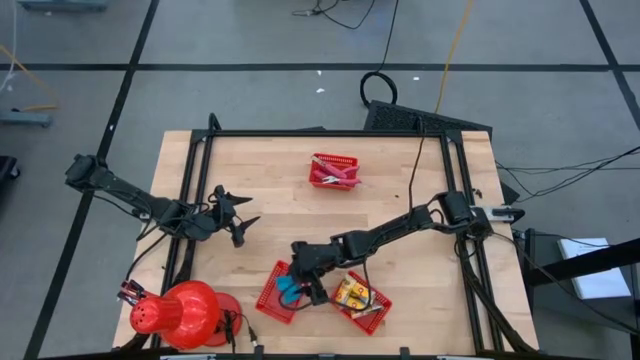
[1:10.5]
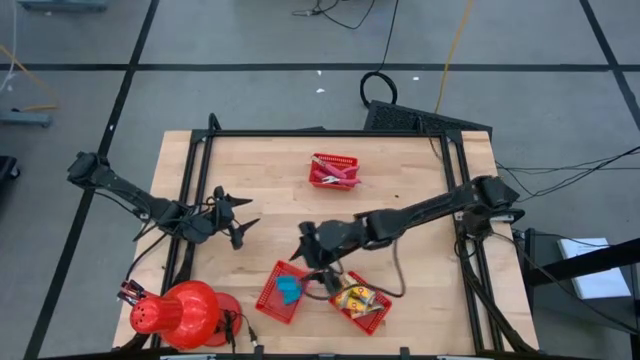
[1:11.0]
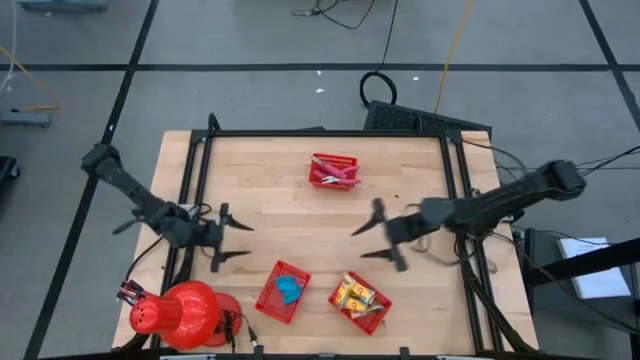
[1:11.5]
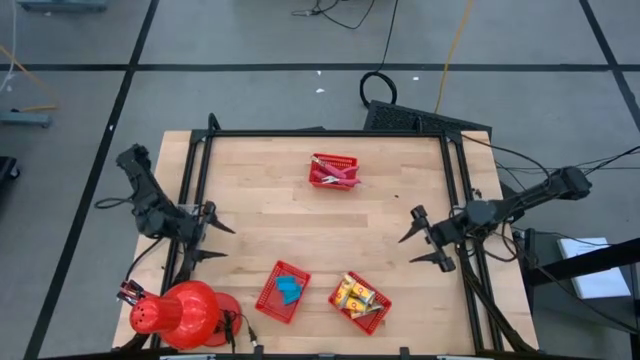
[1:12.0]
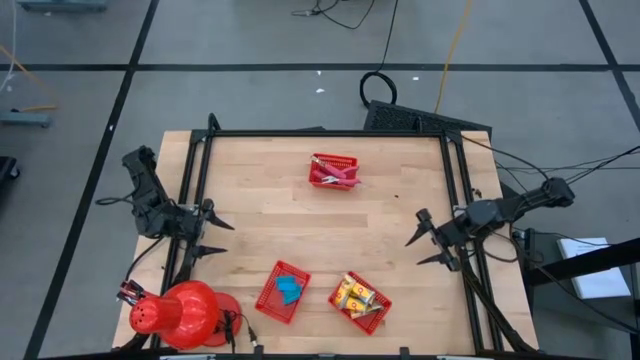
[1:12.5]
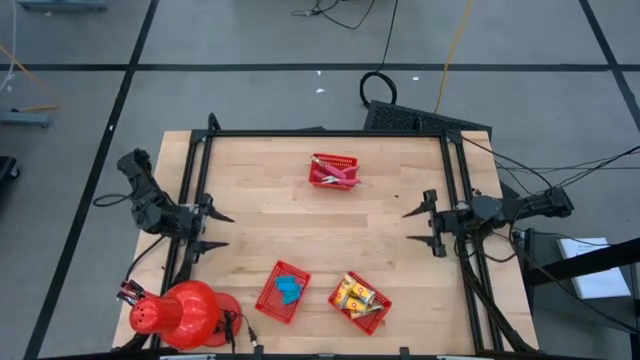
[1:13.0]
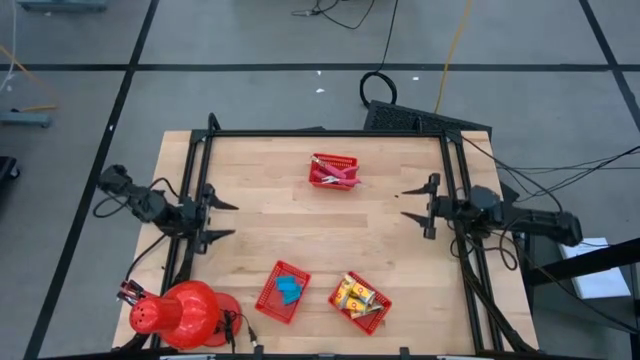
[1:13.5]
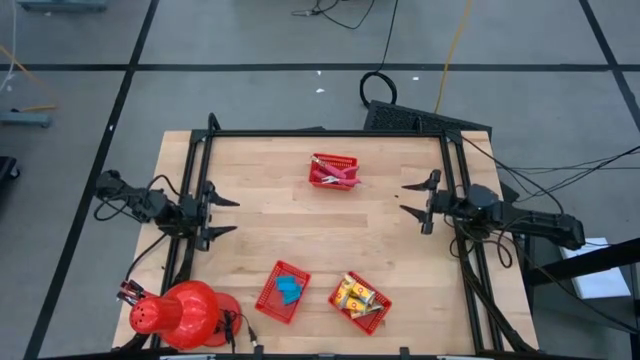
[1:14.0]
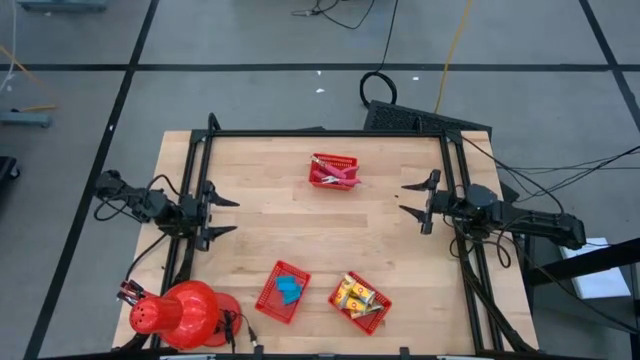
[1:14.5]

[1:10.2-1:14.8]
Task: Pick & Place School Supplies
Return to Home Position

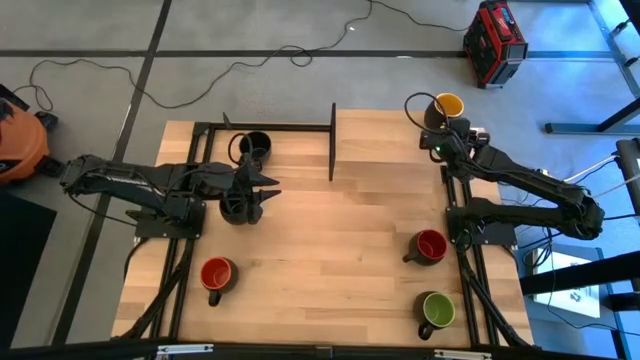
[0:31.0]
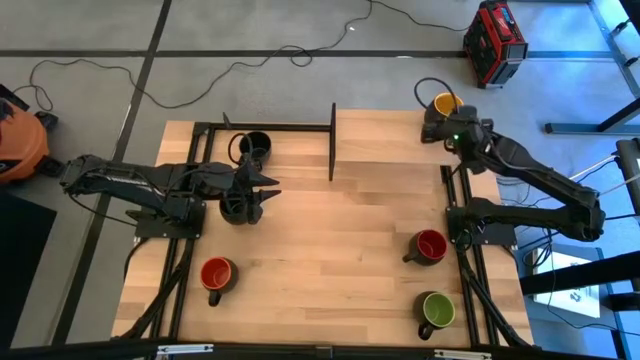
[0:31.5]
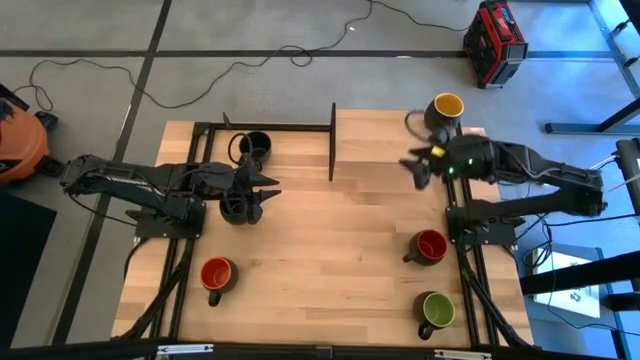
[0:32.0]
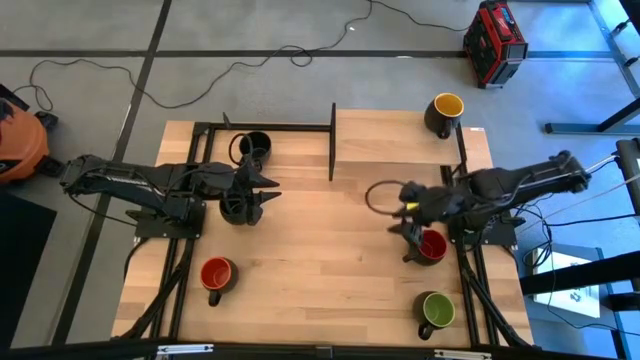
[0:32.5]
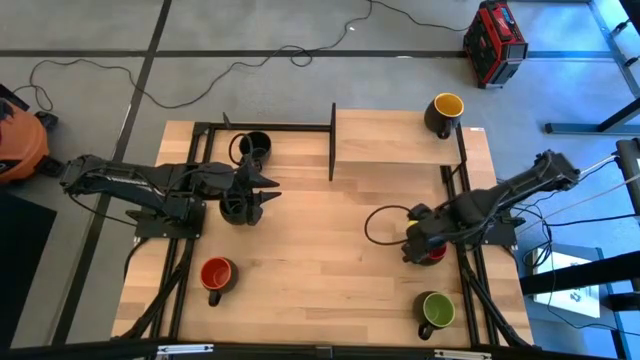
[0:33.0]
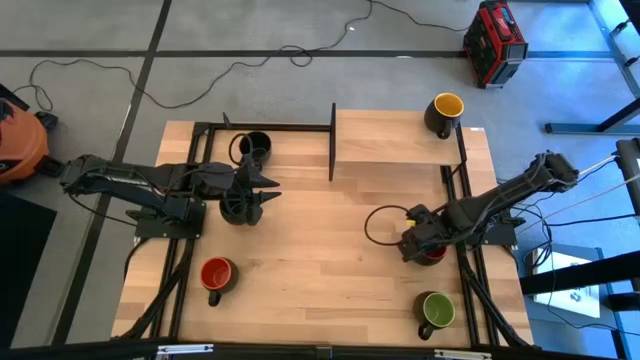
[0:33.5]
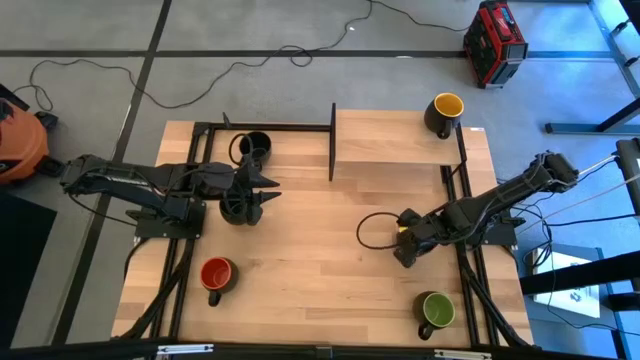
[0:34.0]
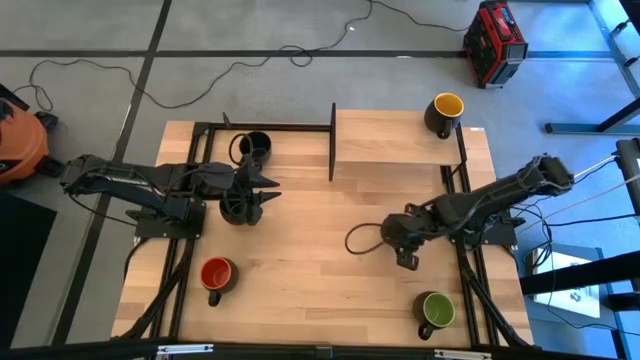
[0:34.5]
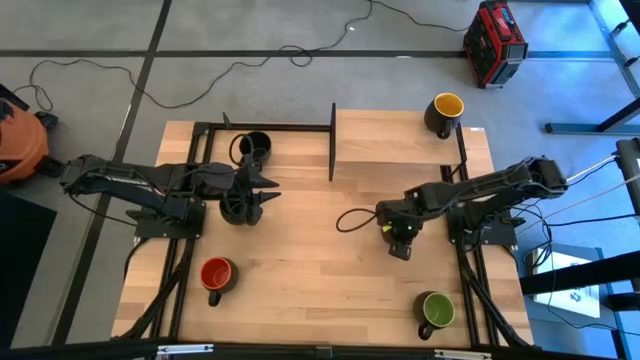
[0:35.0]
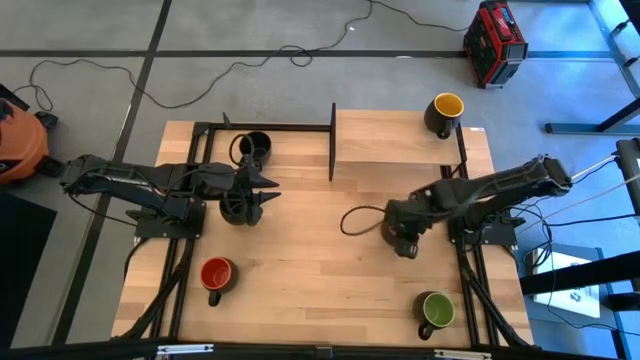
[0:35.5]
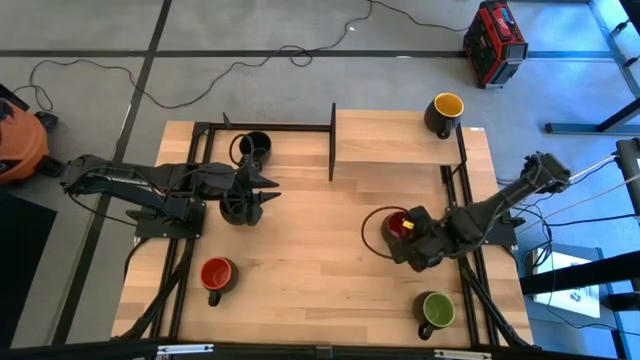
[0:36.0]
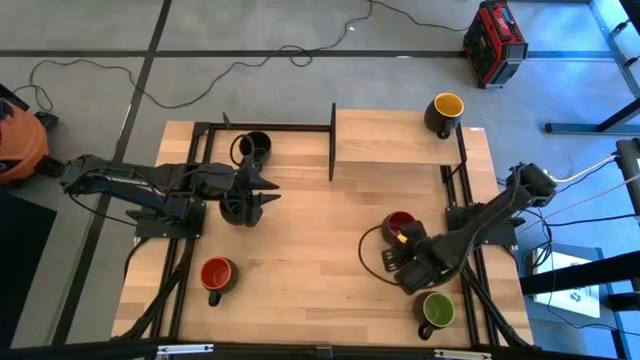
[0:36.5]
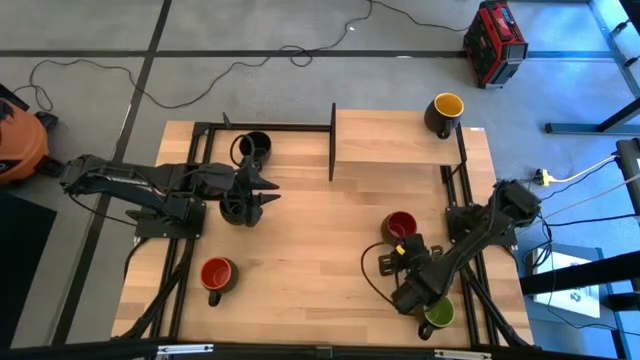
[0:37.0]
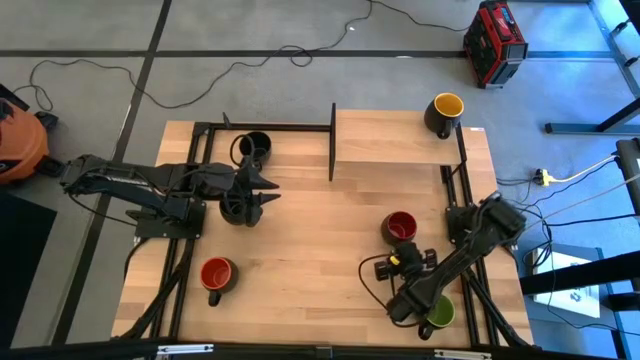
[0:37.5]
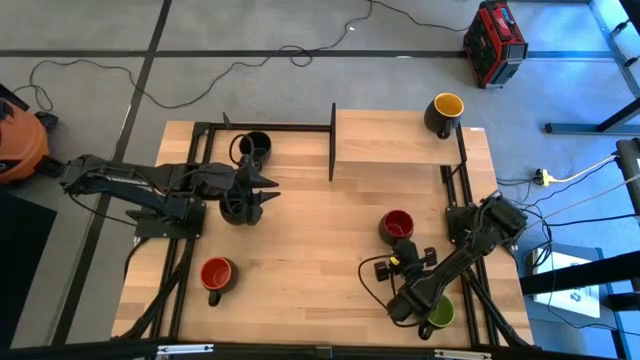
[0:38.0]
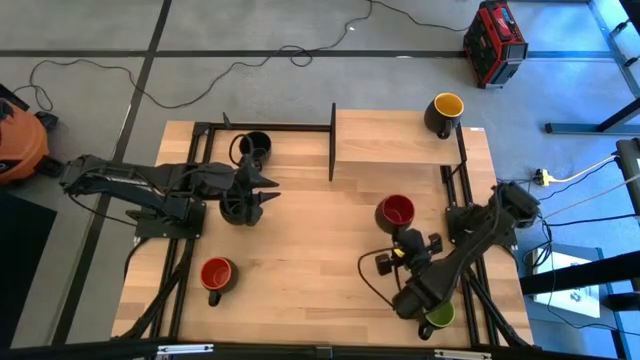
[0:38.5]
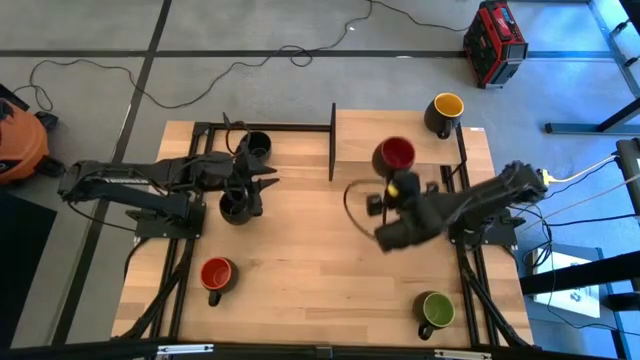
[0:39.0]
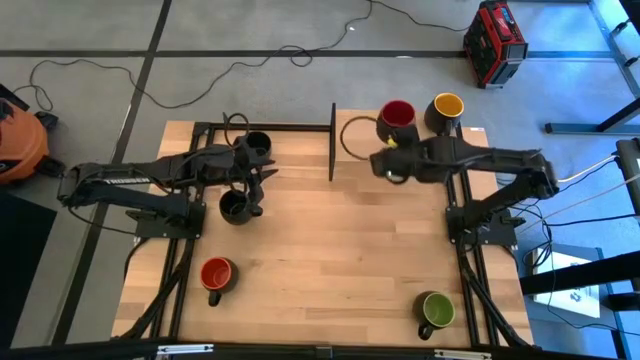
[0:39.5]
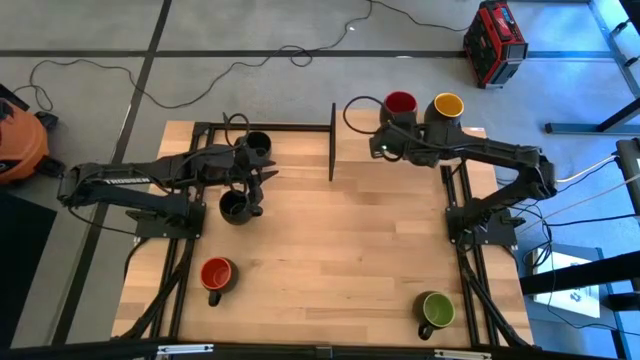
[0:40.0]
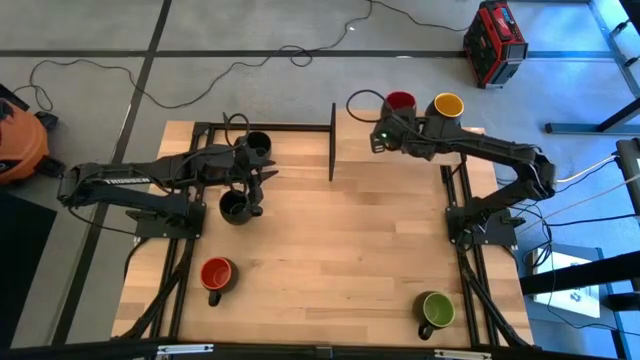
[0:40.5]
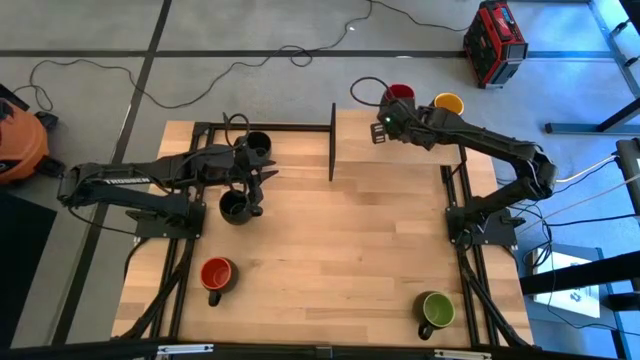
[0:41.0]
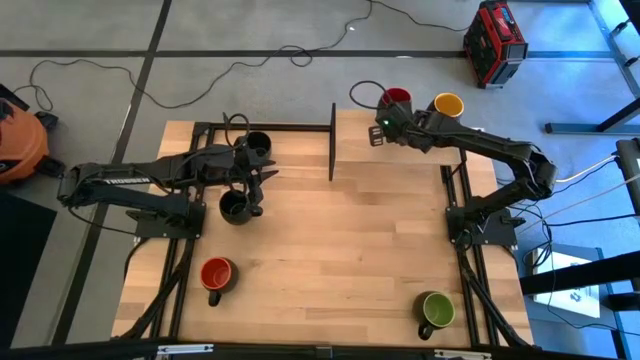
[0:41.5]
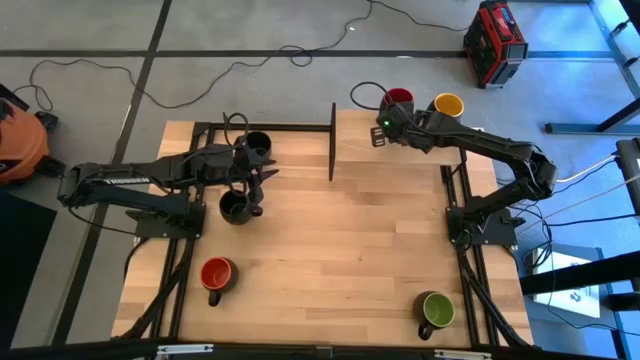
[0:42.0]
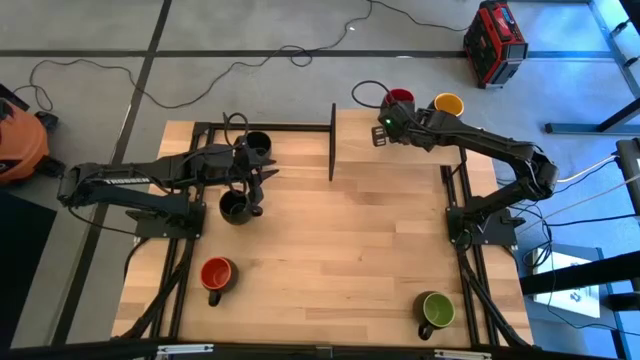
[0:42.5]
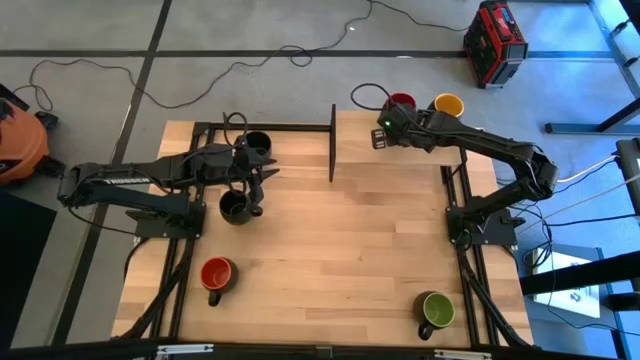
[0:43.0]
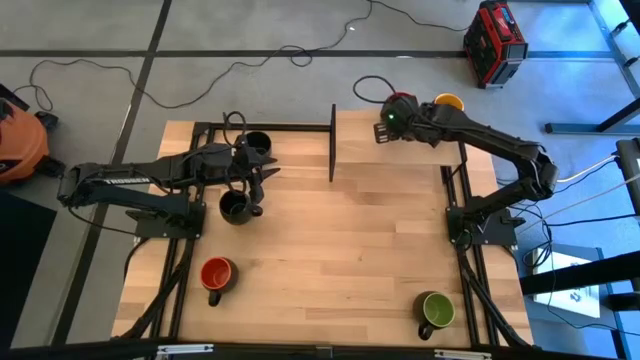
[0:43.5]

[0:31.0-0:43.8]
Task: Place coffee mugs
Put the red mug on the shelf

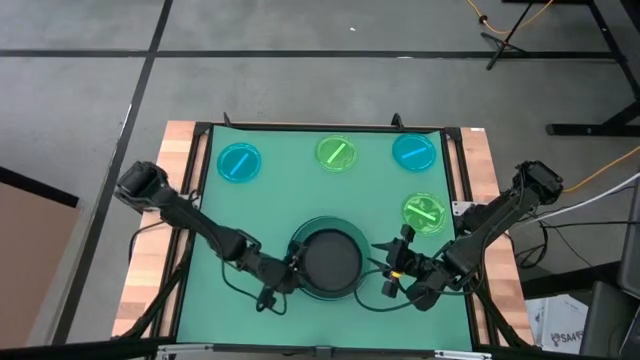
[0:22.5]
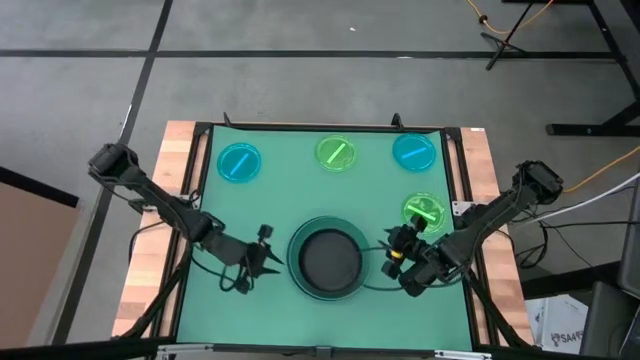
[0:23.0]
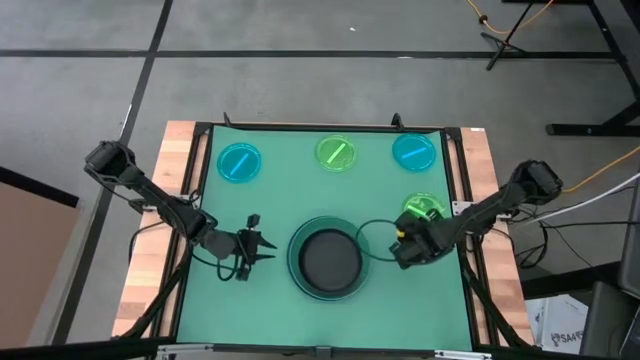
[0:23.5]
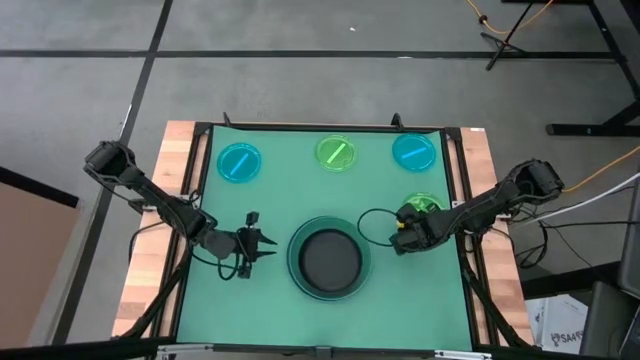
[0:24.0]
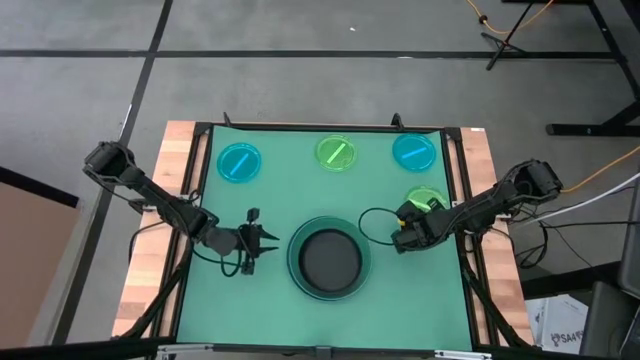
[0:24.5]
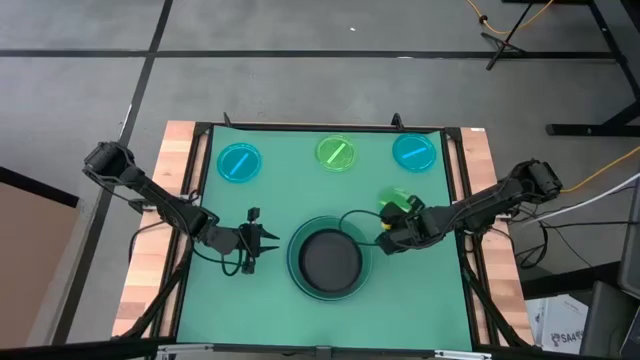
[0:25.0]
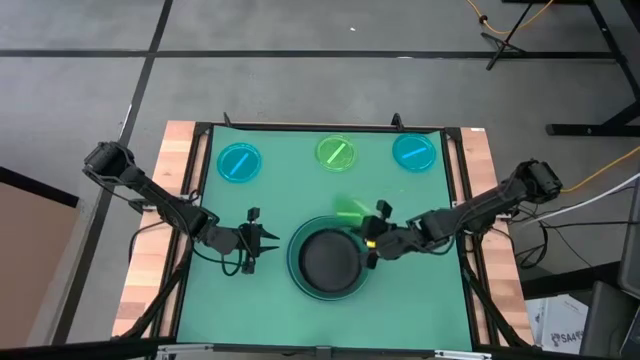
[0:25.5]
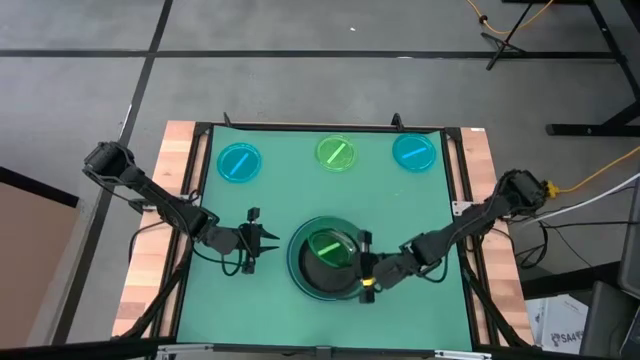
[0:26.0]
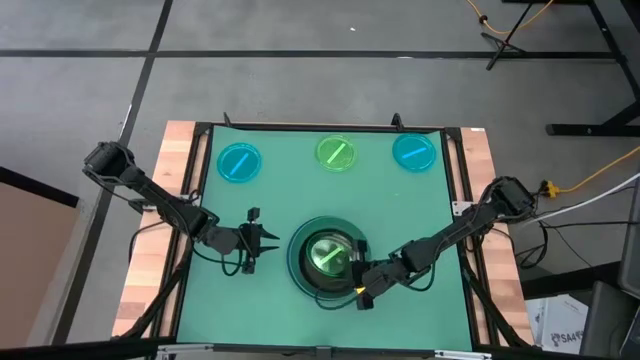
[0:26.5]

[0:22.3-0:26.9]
Task: Stack plastic plates
Stack the right green plate on the black plate
